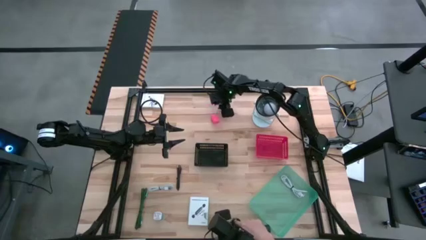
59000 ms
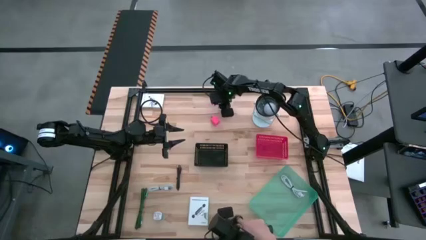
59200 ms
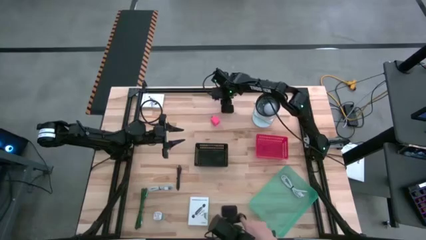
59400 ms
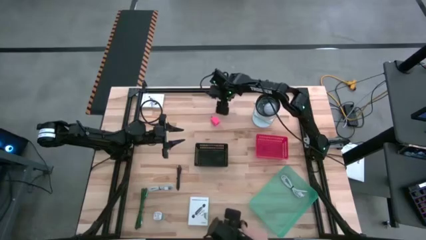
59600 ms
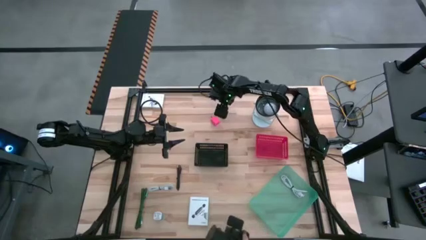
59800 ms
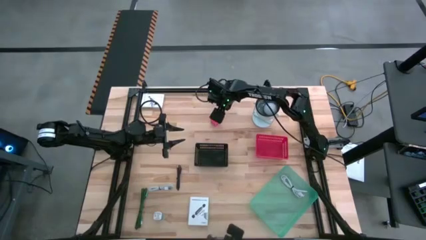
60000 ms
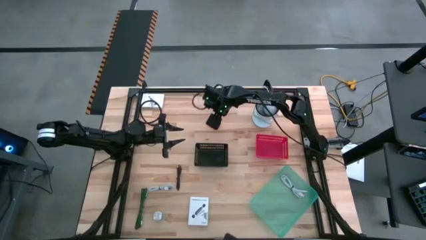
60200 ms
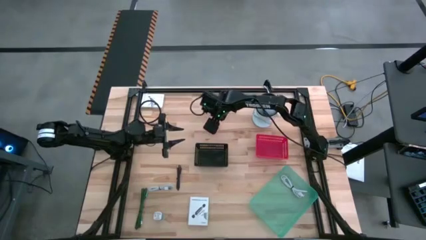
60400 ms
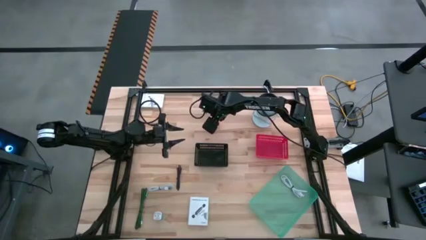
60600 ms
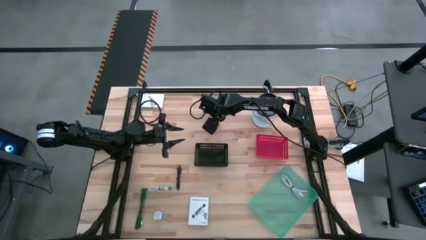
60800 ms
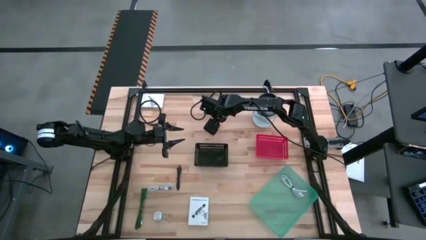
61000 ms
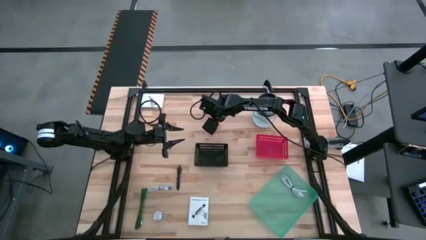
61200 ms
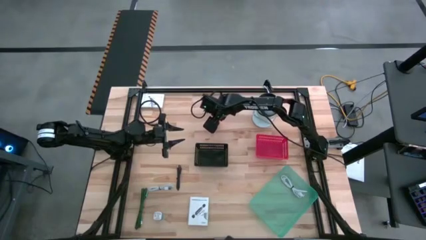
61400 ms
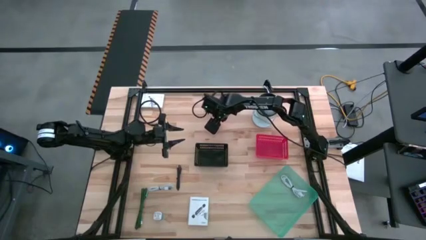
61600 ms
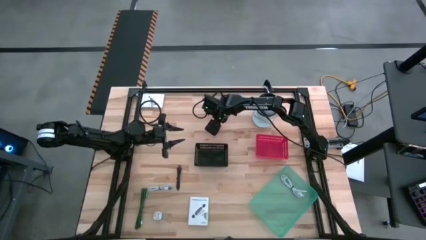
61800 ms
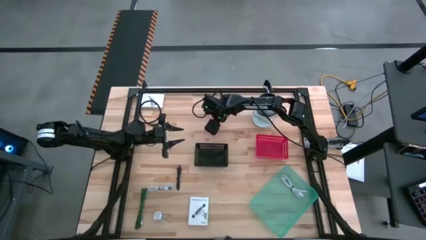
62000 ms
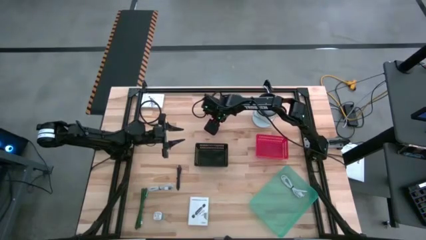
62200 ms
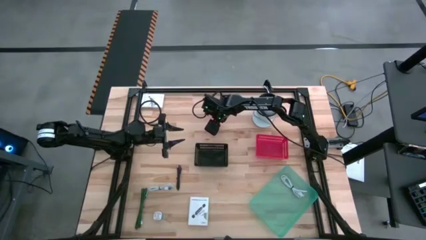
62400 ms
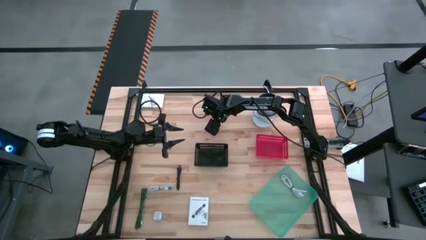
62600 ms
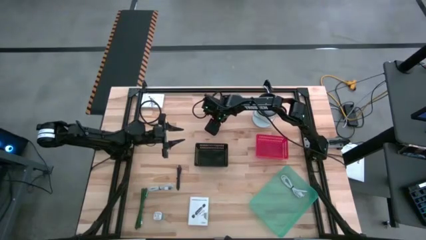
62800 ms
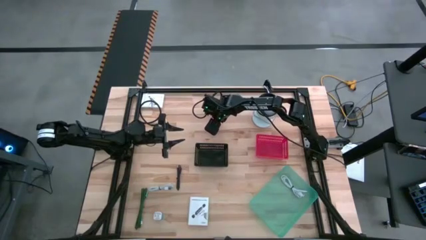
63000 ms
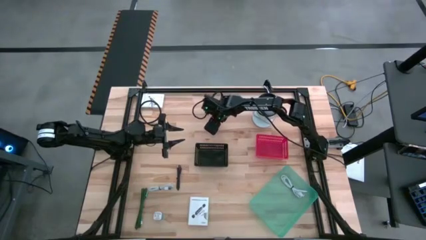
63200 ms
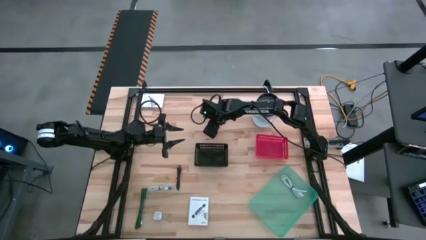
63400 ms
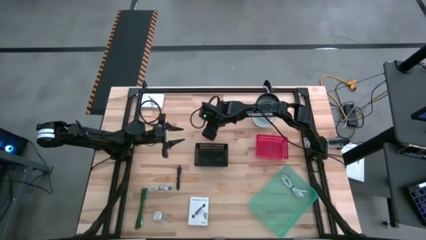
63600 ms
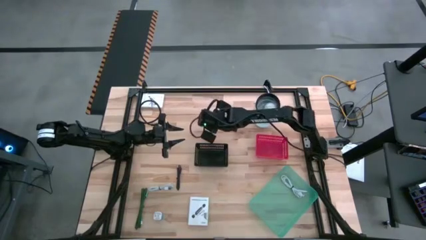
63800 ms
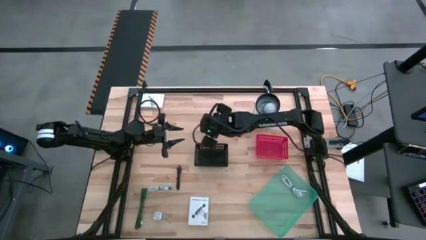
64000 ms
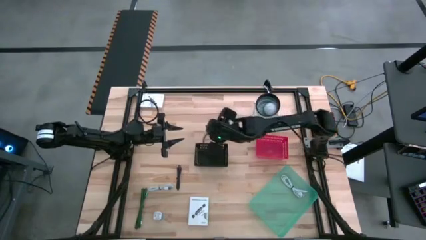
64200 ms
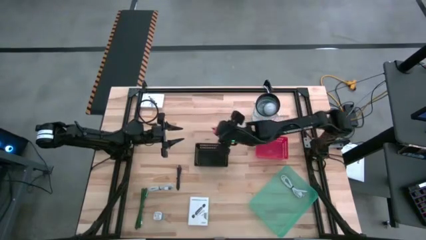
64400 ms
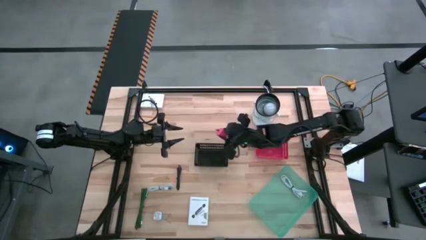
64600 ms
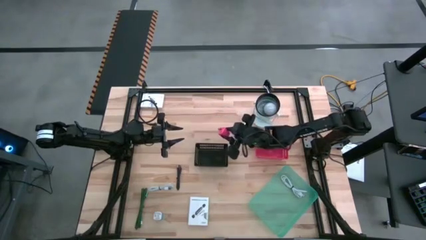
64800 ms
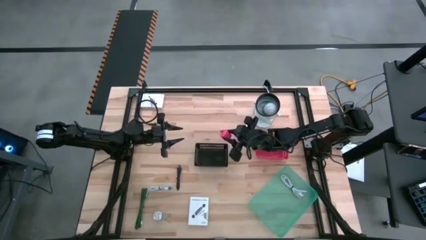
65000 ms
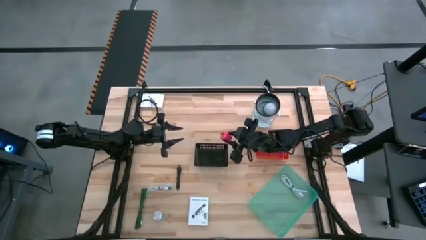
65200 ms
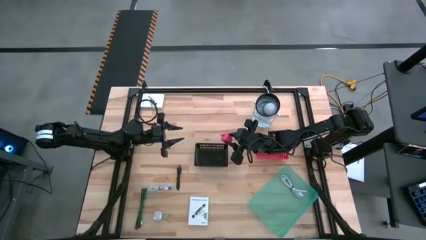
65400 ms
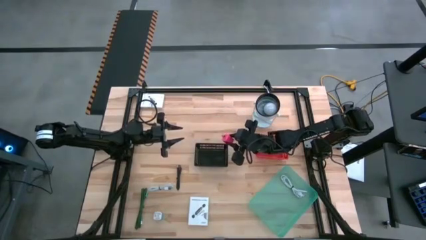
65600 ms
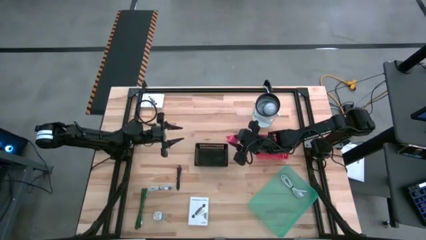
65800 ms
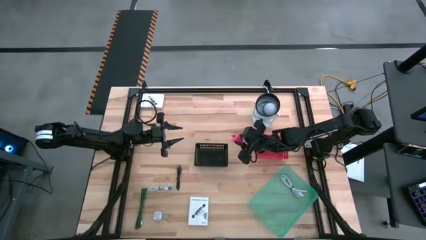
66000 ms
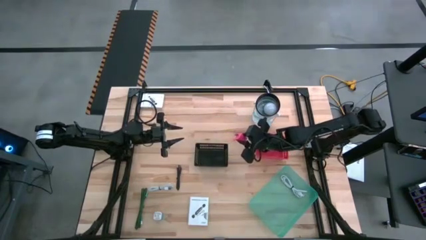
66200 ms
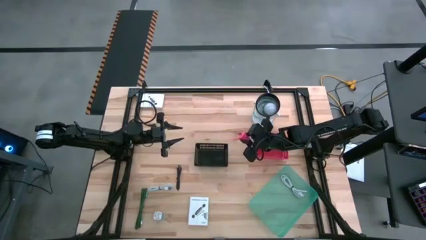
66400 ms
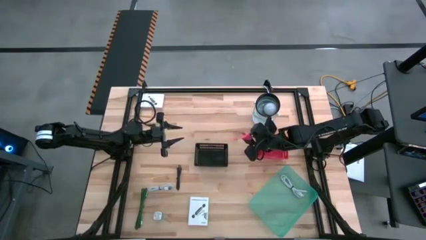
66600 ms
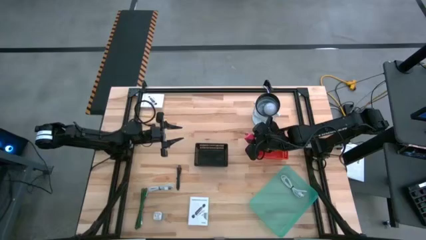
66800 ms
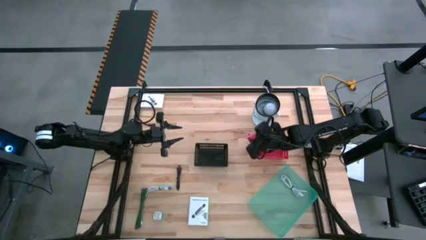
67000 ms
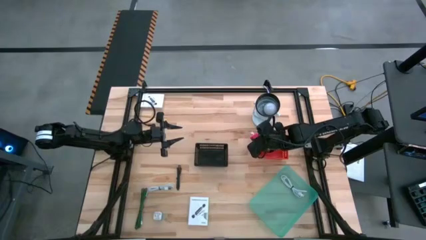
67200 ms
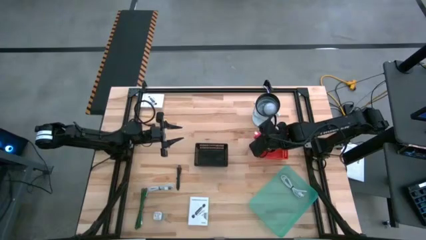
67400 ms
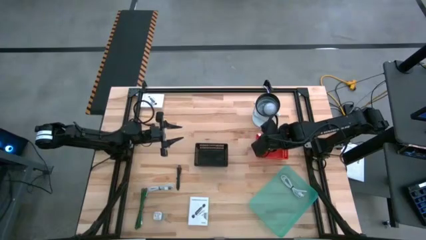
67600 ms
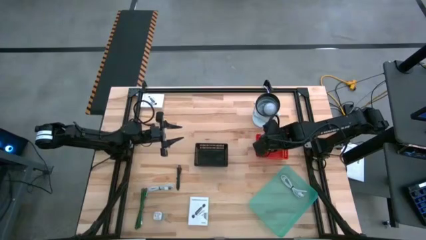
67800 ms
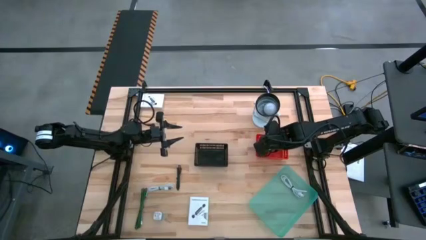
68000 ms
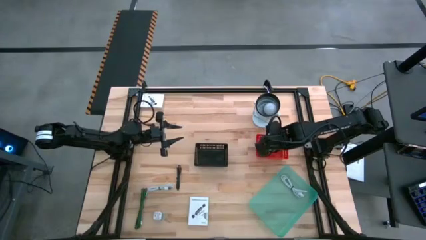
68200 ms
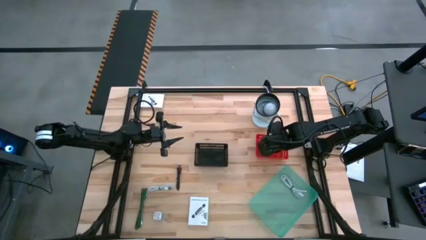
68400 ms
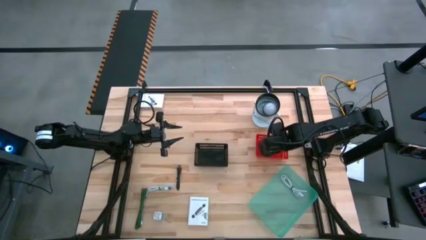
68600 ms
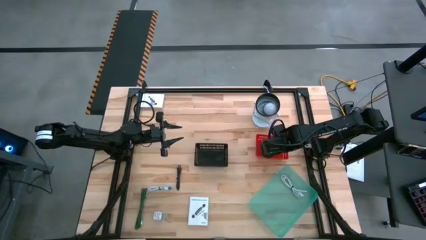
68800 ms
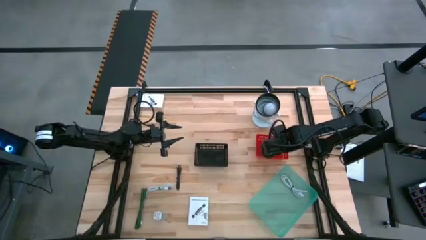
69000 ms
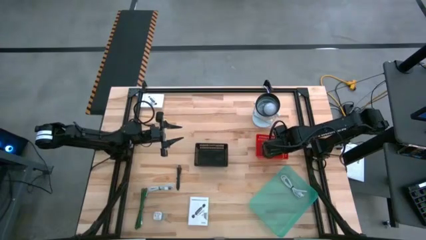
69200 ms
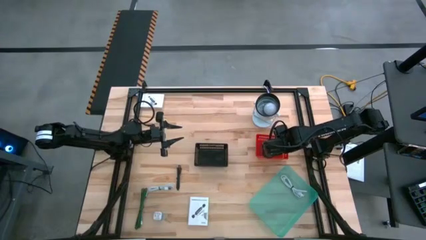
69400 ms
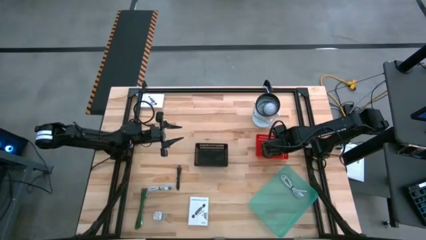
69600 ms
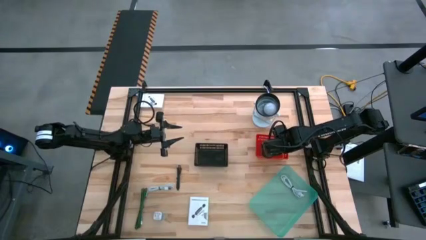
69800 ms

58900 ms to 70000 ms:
Task: Pick and place items into bin
Put the pink charger adapter into the red bin

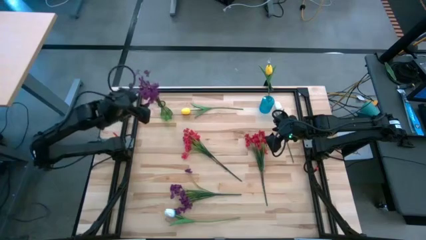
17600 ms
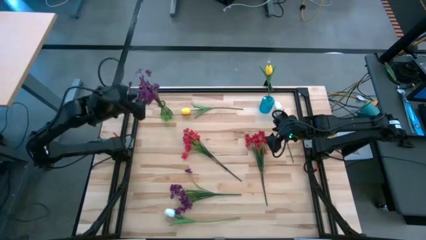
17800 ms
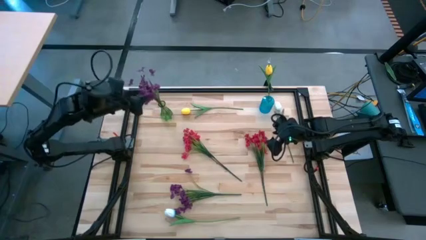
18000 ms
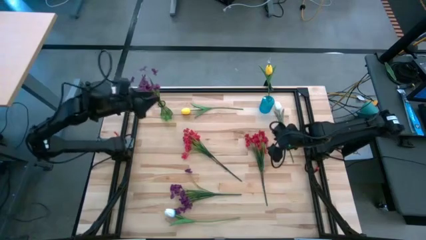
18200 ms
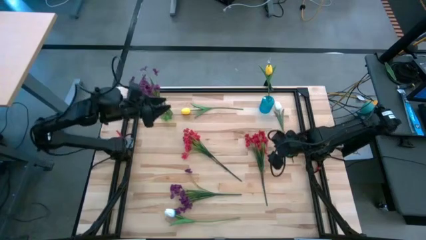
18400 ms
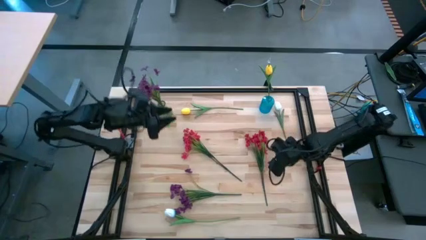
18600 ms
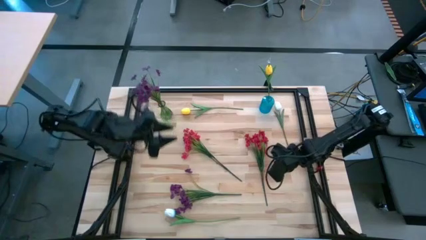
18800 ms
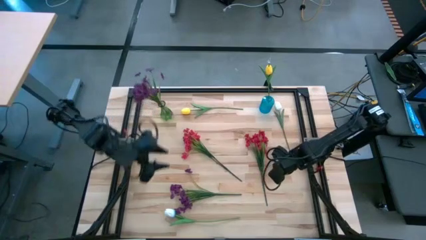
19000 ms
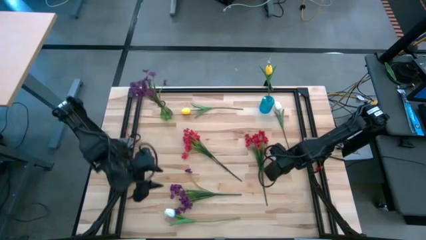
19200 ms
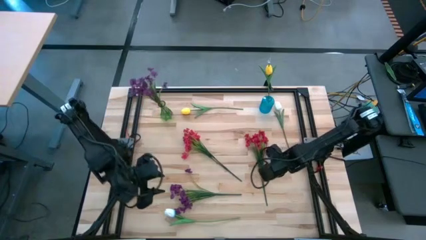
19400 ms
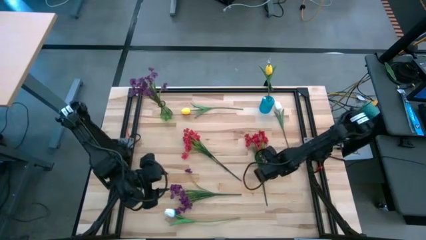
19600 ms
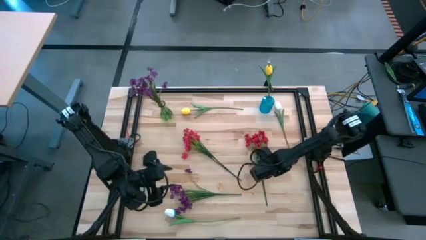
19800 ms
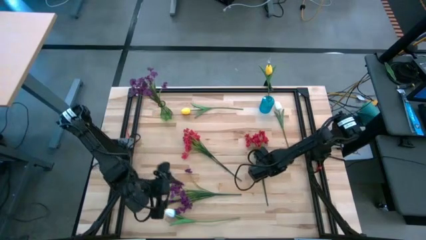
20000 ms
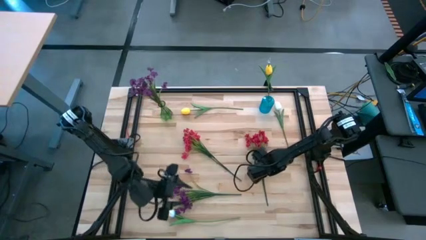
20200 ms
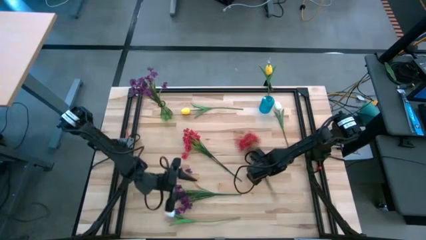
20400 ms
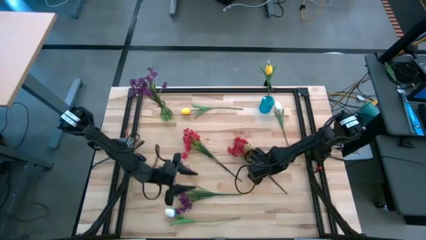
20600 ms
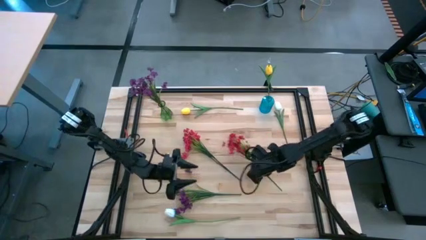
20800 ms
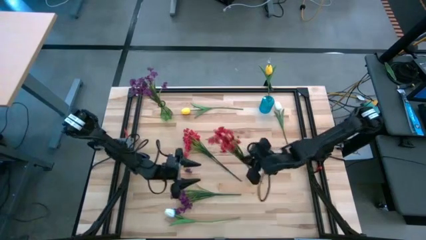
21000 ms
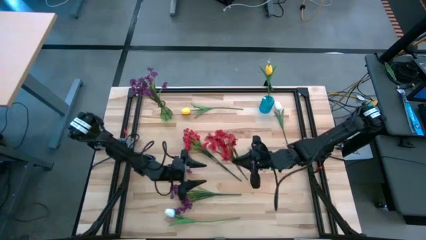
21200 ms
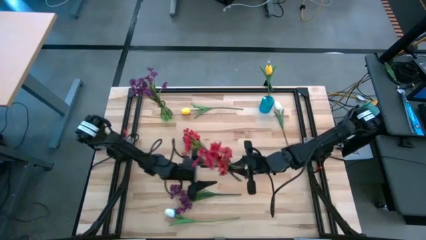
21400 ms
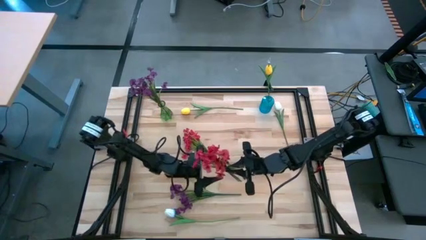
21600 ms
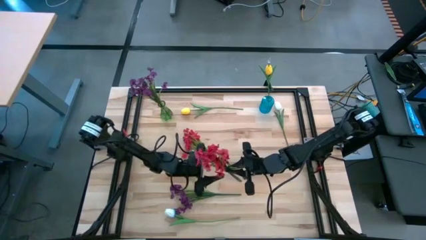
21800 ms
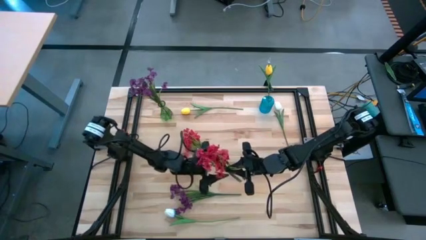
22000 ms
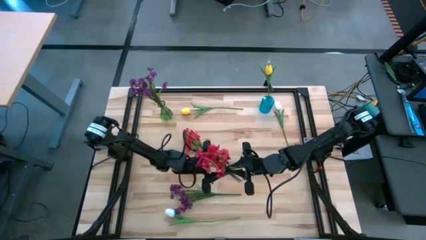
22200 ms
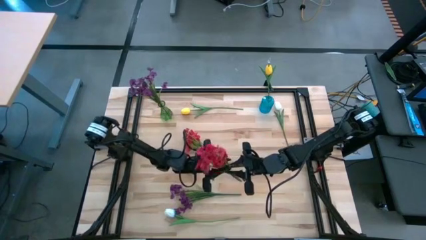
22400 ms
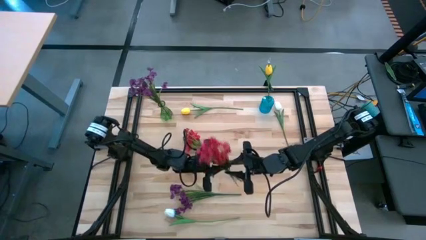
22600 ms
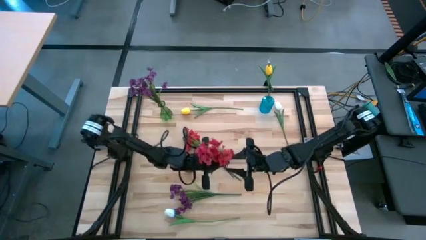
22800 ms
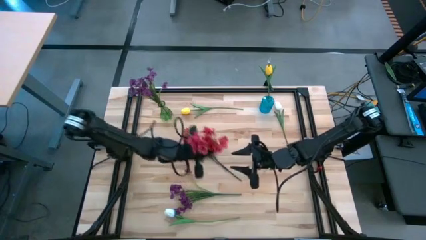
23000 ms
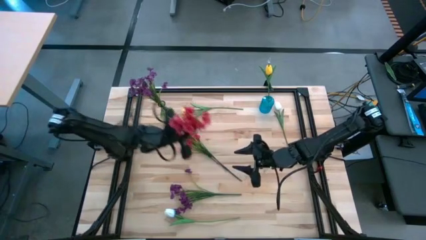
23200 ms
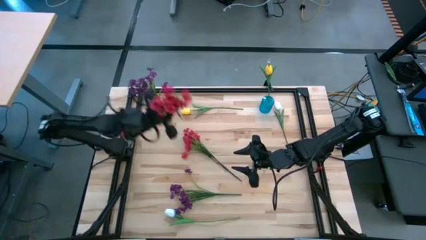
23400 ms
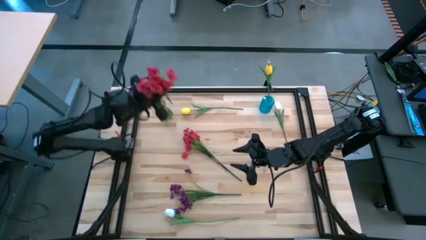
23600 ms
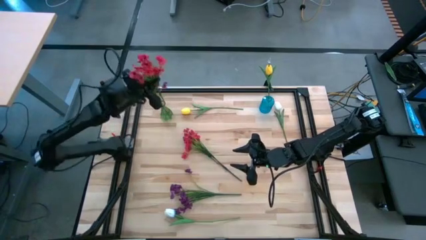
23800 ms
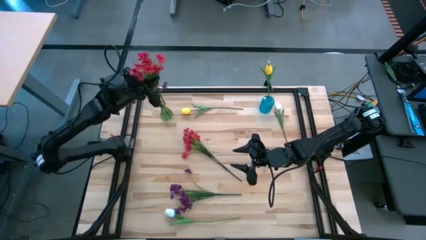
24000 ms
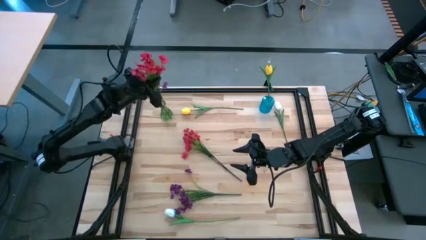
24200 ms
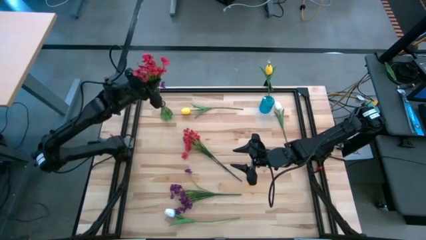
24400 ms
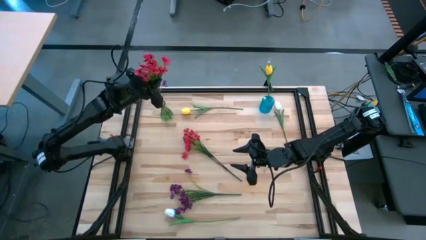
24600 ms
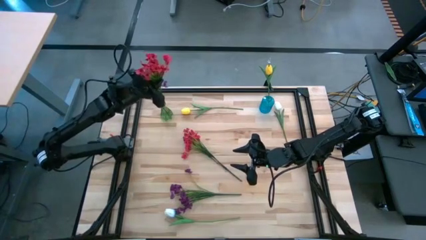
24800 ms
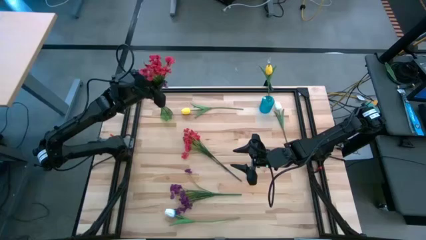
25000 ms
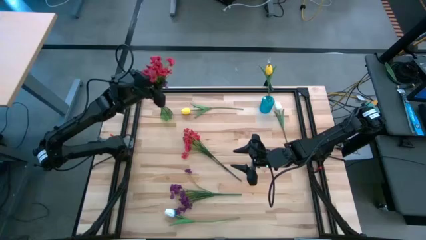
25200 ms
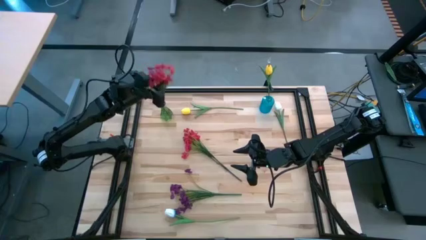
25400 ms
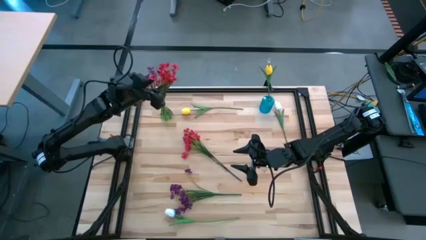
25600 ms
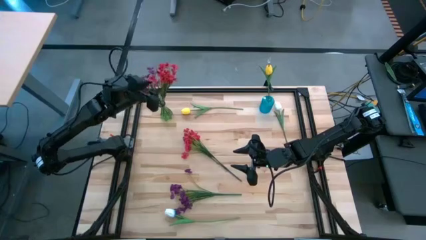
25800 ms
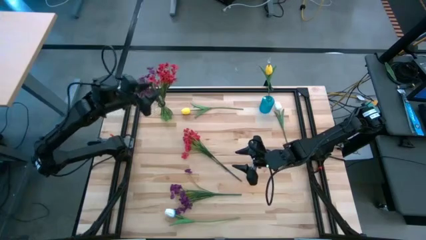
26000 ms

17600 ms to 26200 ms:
Task: Sort flowers into vase by color
Put the right red flowers into the green vase
